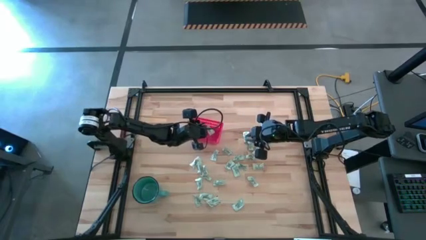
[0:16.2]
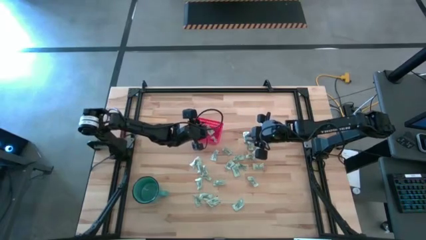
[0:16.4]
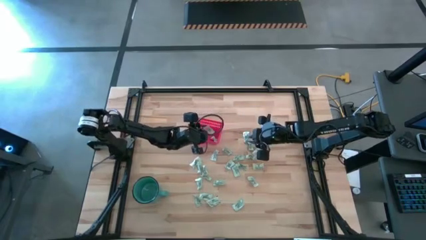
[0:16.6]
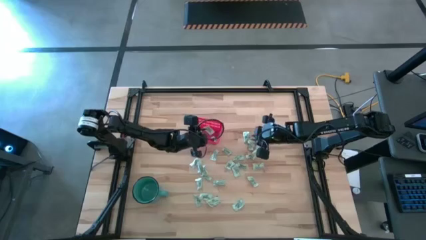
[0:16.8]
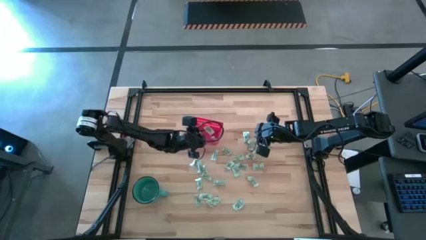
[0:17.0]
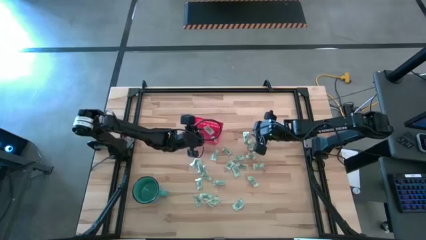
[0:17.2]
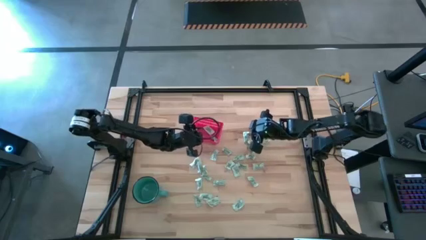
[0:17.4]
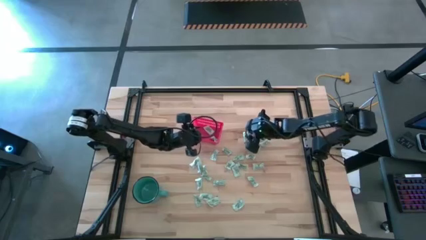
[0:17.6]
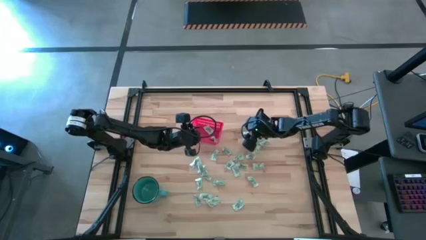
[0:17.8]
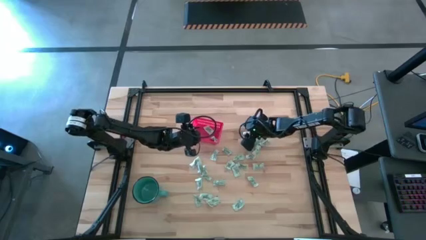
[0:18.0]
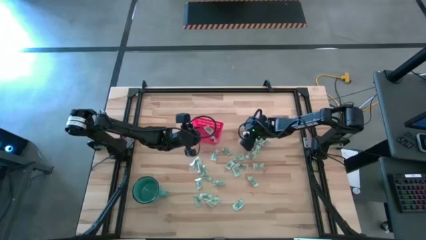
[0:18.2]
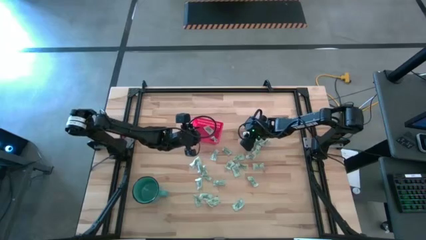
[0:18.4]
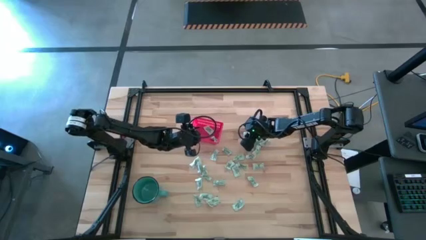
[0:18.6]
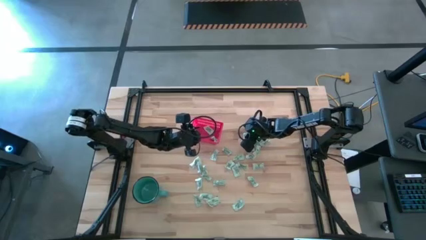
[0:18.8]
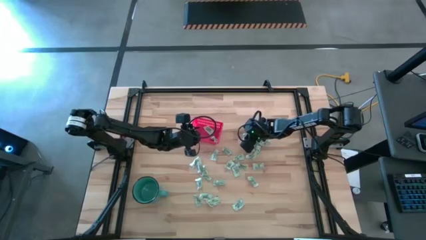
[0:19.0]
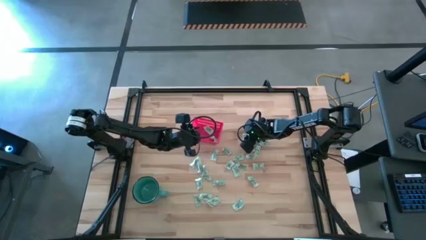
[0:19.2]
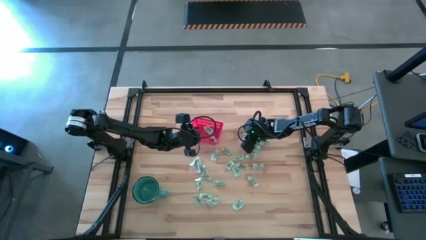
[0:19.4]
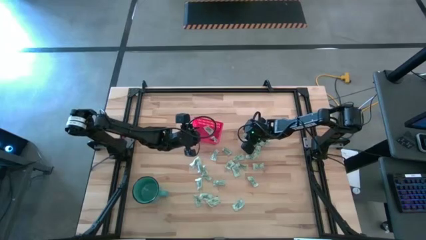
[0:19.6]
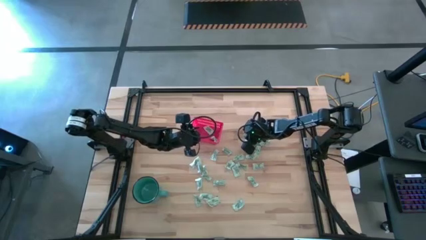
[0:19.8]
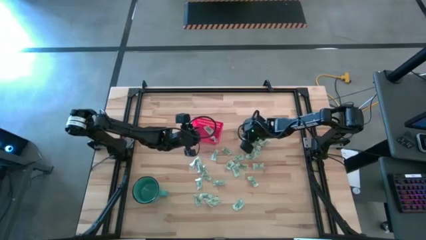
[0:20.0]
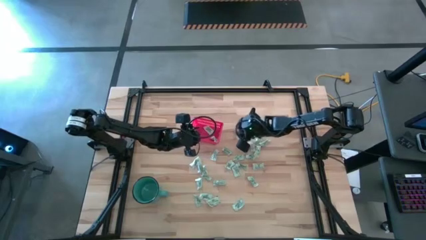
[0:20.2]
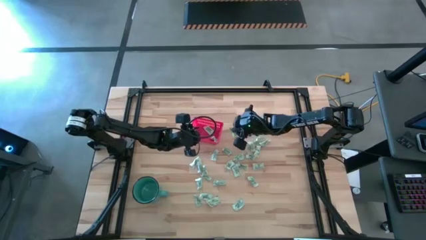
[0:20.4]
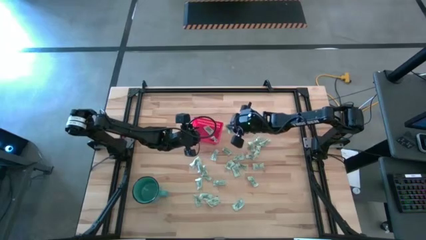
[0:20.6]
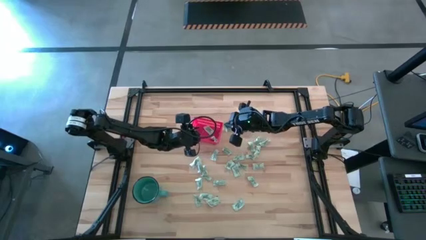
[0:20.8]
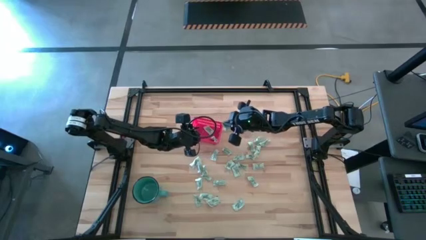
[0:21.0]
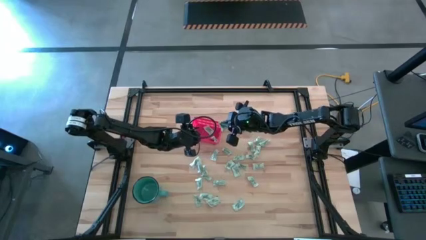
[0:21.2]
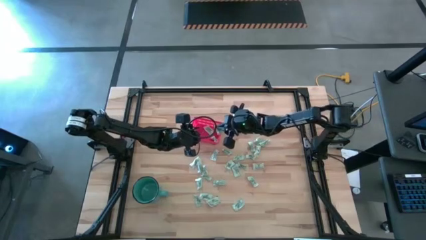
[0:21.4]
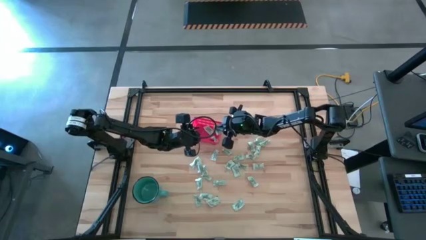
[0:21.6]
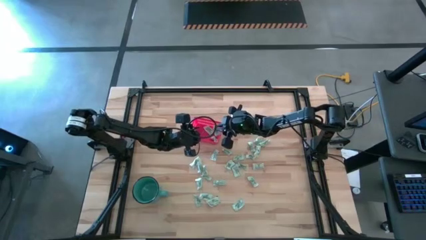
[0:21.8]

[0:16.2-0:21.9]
Task: Pick and place items into bin
Put the stevia packet into the red bin

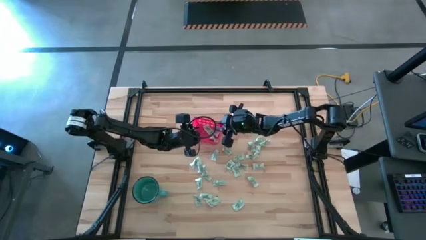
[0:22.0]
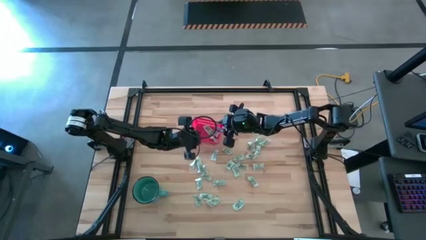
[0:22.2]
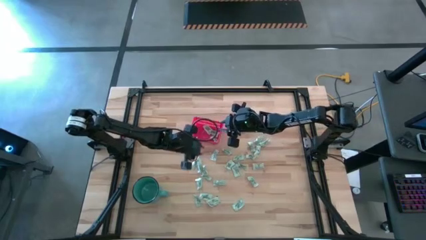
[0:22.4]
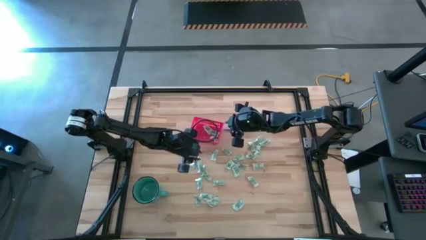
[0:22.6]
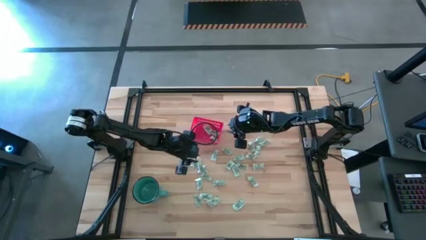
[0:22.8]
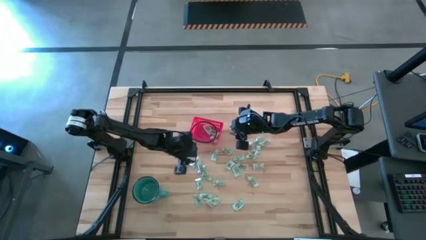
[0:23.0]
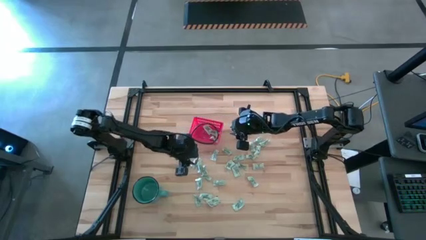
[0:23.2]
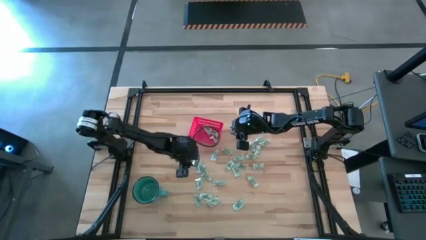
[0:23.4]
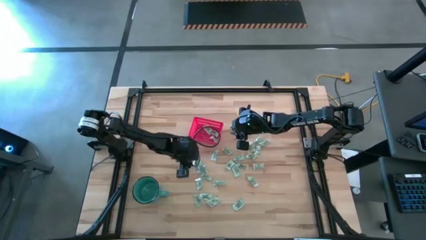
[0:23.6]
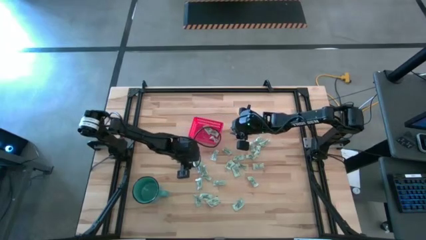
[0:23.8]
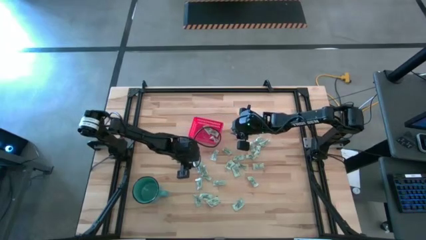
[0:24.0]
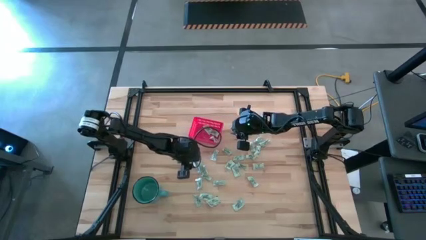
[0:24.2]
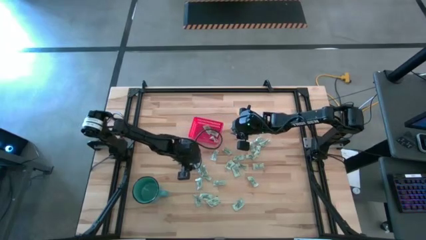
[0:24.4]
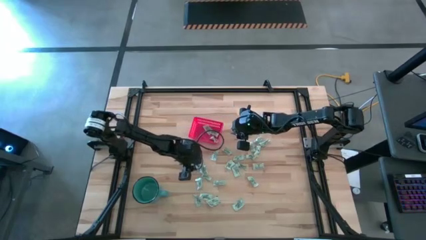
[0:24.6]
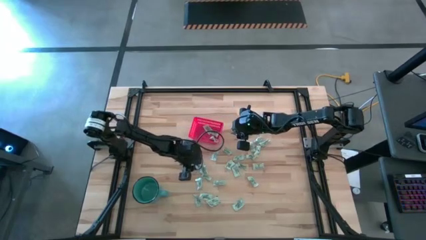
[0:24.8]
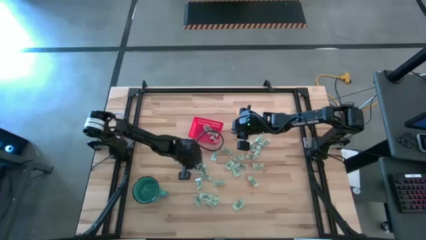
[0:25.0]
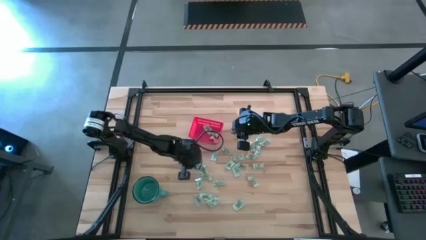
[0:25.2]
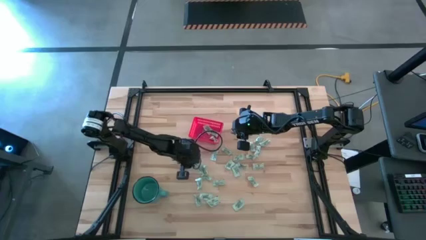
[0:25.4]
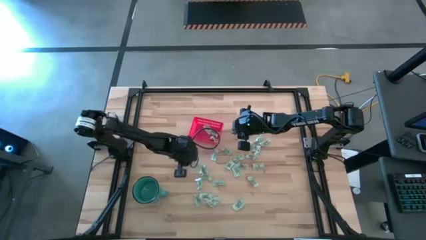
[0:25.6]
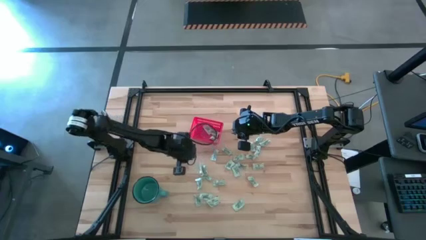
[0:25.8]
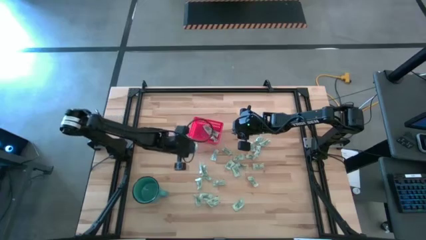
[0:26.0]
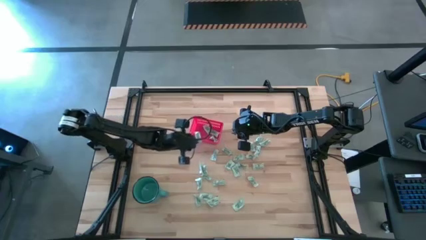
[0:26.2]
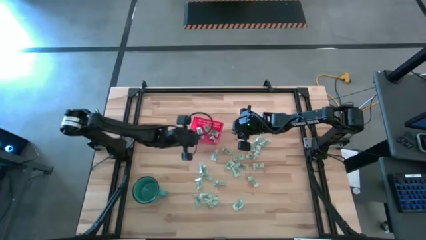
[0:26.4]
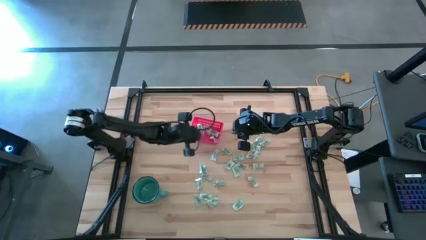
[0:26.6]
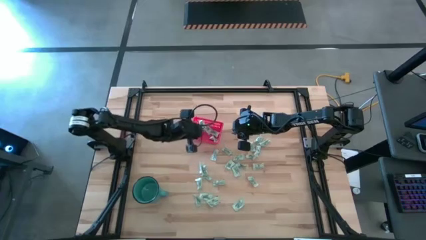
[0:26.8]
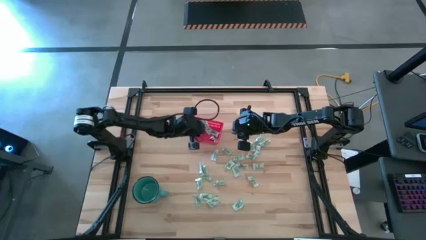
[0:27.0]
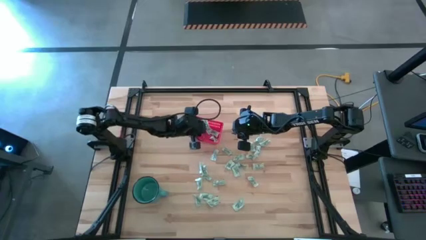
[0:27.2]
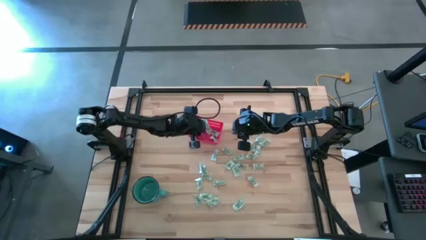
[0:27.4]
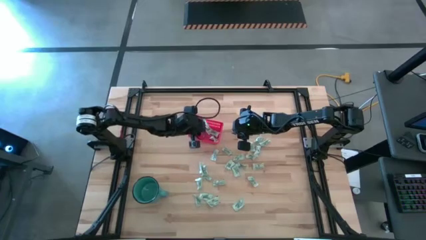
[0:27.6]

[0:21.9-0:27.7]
Put the stevia packet into the red bin

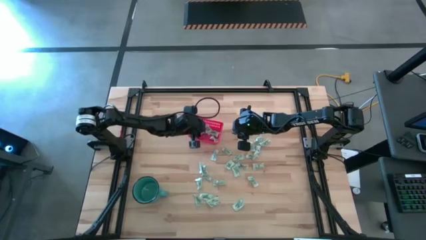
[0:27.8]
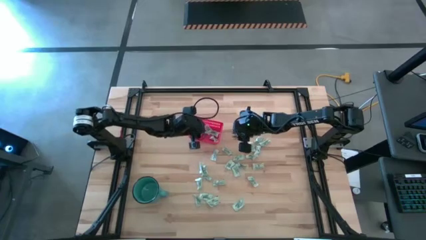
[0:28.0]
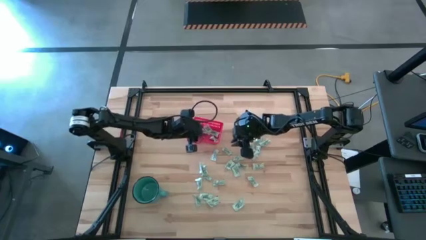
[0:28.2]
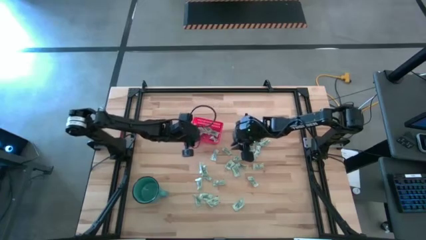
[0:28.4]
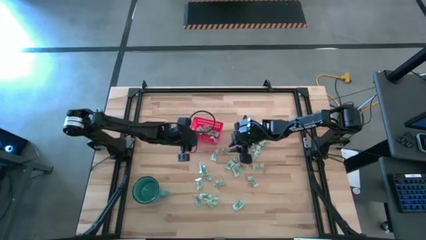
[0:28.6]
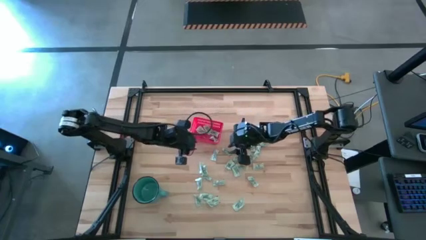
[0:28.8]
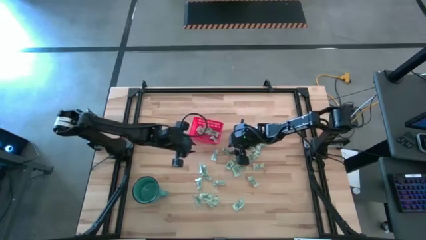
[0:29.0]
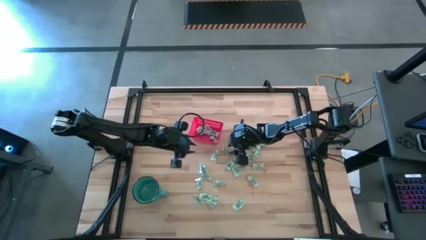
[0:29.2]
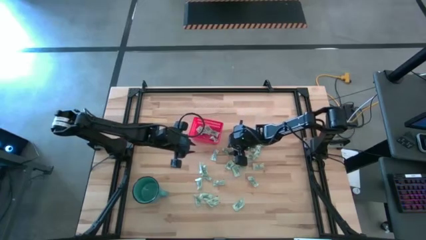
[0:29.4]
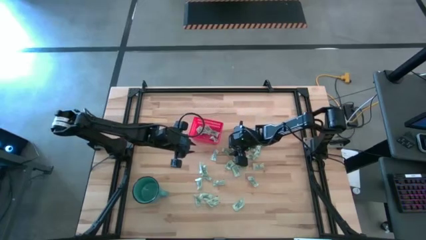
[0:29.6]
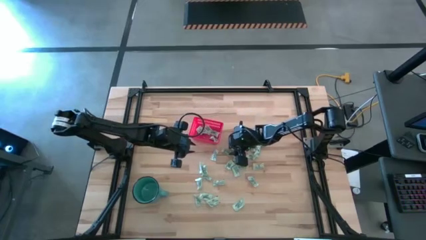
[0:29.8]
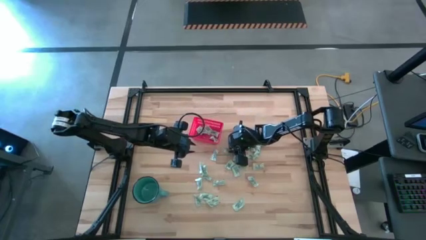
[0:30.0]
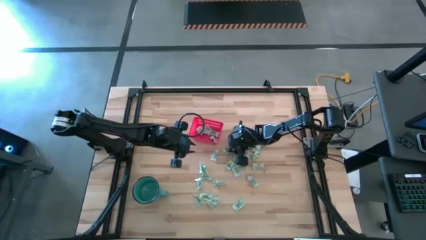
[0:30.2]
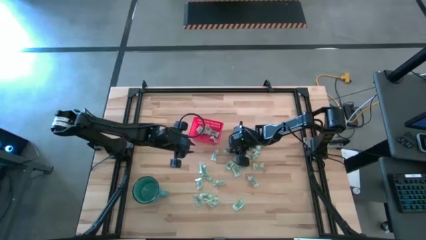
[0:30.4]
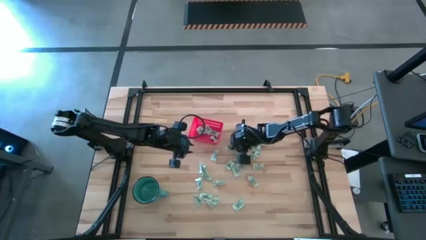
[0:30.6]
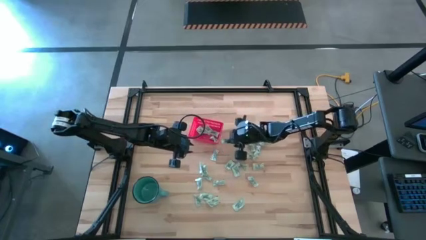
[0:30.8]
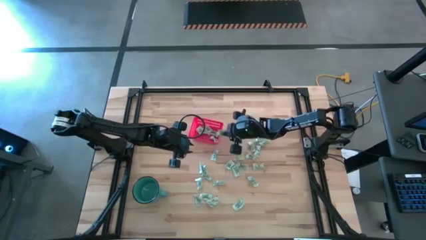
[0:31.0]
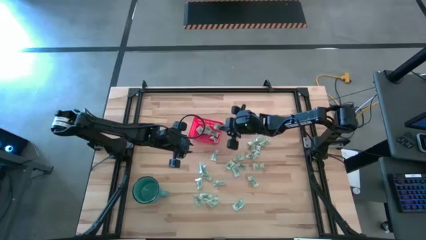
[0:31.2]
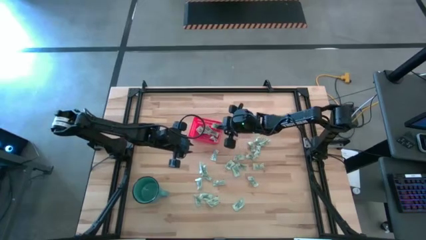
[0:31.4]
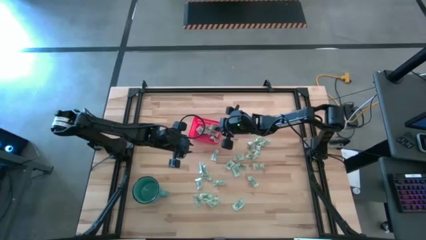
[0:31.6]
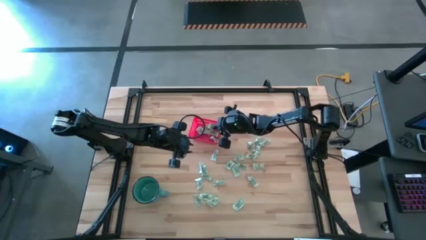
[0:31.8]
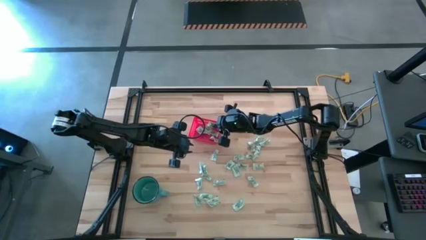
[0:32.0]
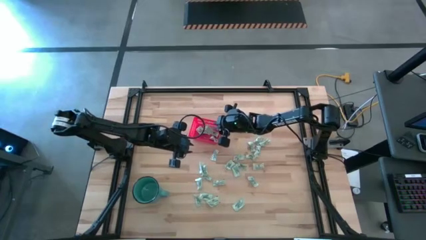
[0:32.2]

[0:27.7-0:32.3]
Put the stevia packet into the red bin
